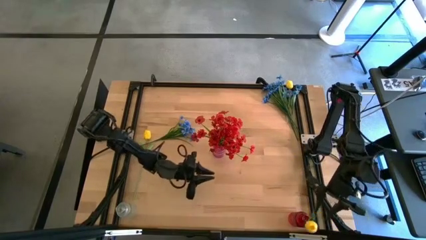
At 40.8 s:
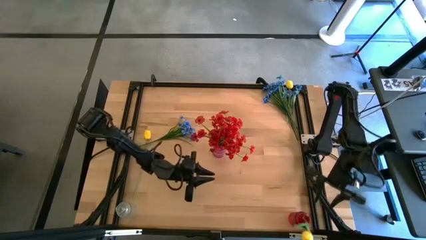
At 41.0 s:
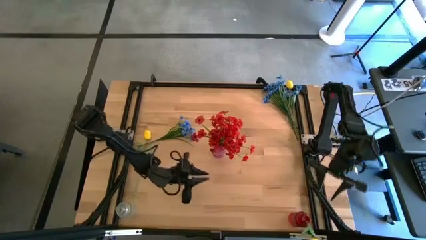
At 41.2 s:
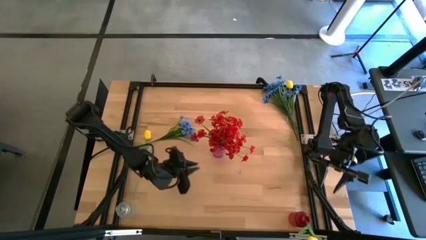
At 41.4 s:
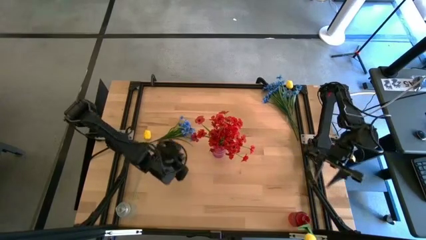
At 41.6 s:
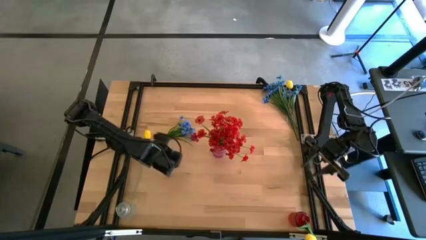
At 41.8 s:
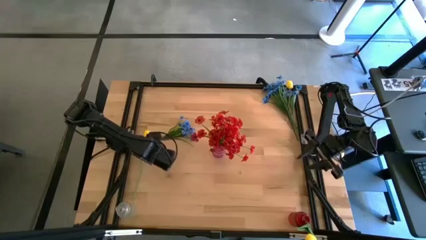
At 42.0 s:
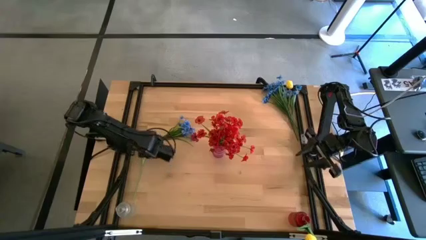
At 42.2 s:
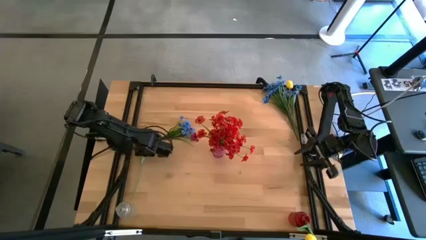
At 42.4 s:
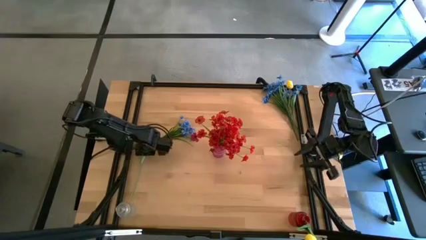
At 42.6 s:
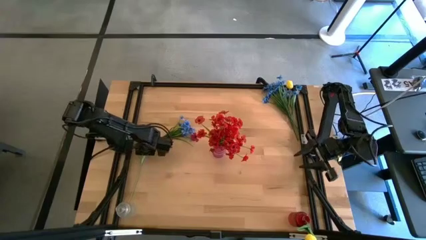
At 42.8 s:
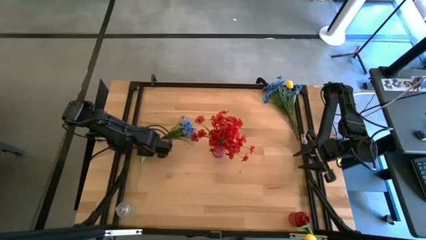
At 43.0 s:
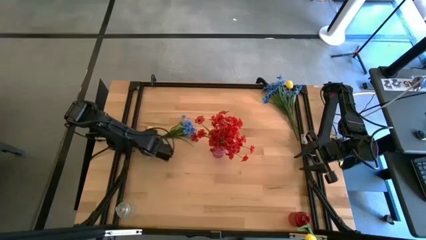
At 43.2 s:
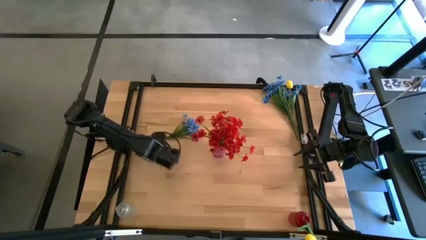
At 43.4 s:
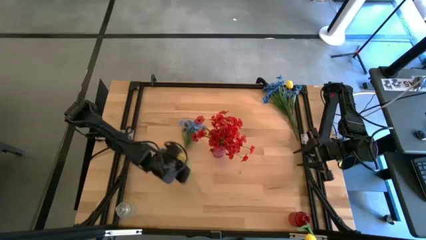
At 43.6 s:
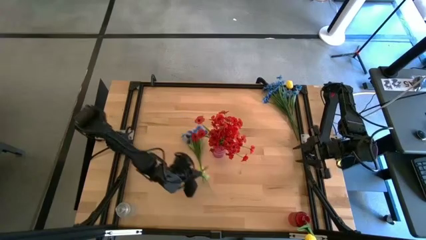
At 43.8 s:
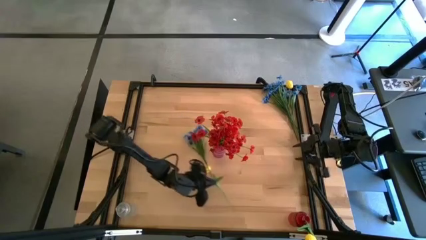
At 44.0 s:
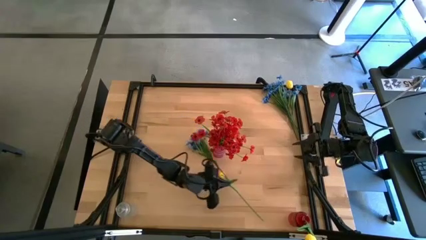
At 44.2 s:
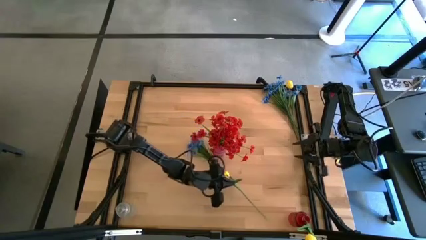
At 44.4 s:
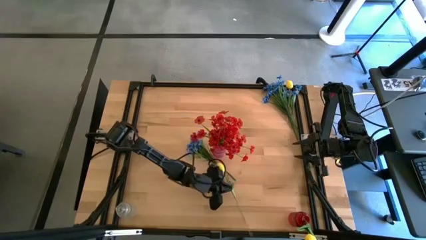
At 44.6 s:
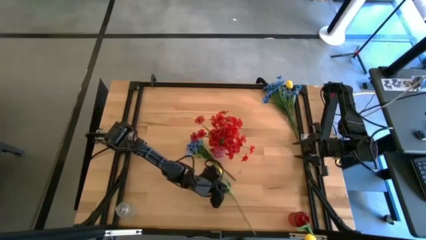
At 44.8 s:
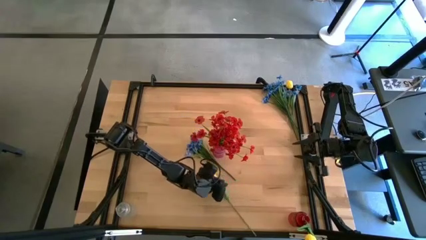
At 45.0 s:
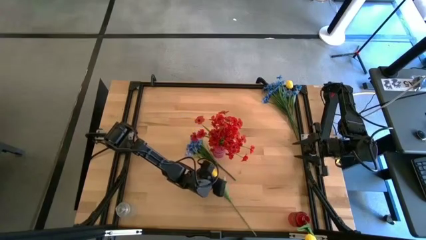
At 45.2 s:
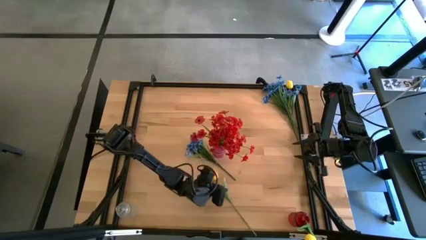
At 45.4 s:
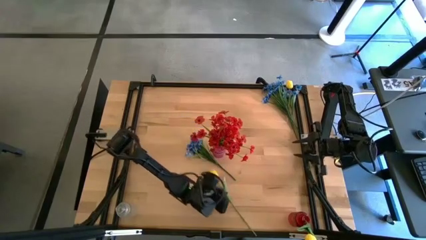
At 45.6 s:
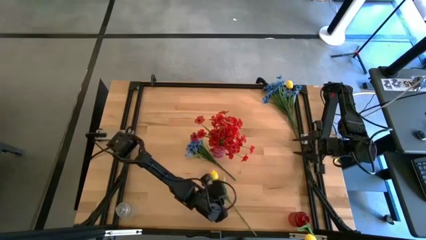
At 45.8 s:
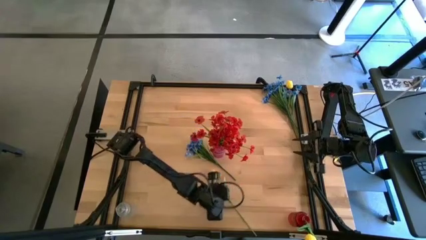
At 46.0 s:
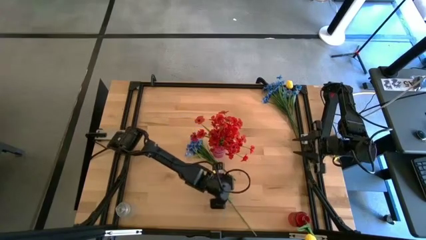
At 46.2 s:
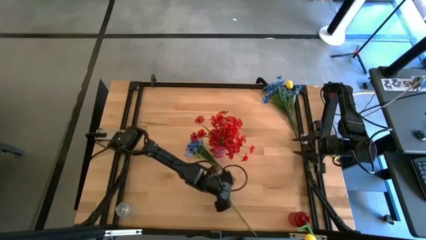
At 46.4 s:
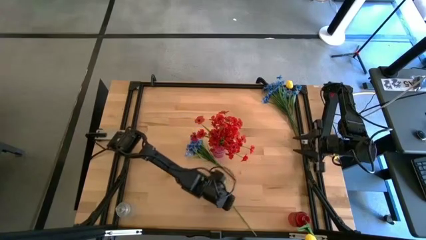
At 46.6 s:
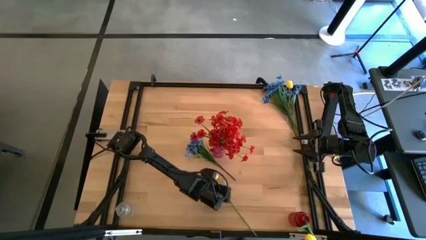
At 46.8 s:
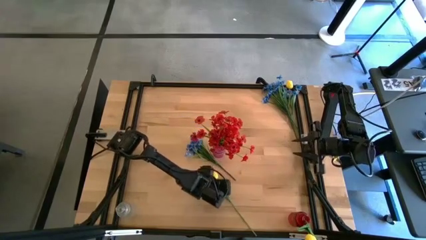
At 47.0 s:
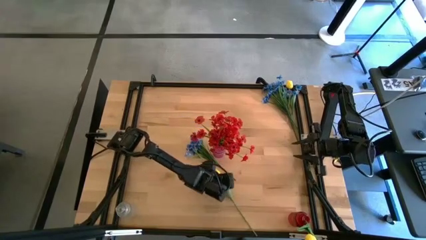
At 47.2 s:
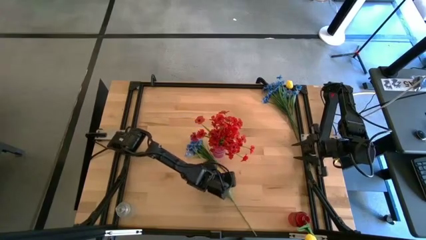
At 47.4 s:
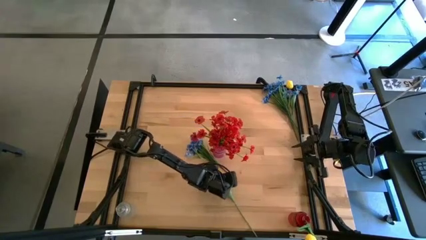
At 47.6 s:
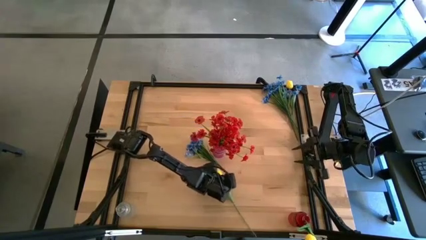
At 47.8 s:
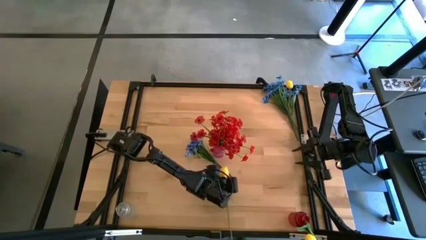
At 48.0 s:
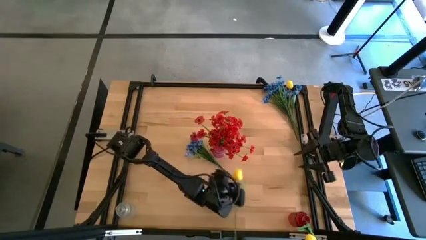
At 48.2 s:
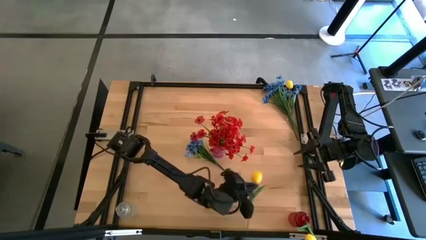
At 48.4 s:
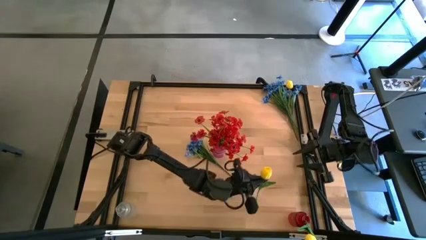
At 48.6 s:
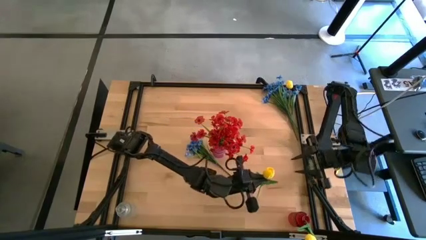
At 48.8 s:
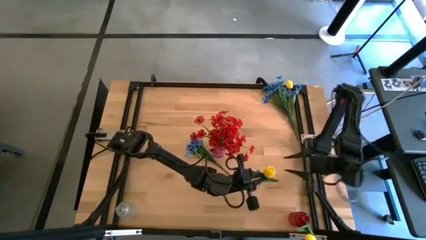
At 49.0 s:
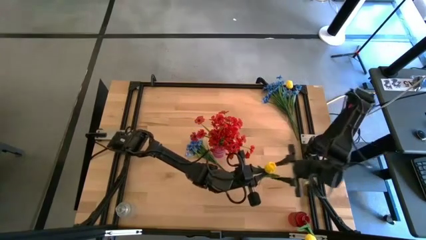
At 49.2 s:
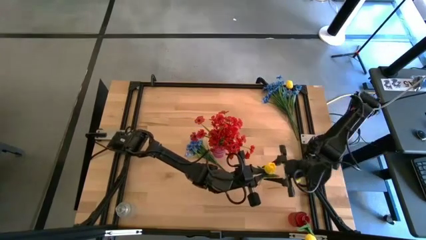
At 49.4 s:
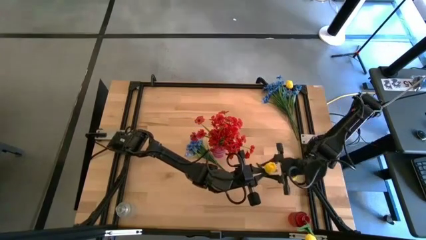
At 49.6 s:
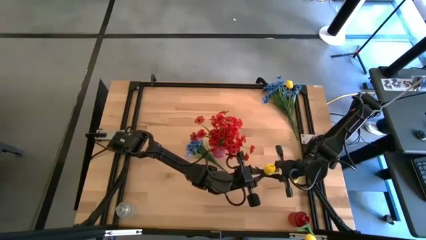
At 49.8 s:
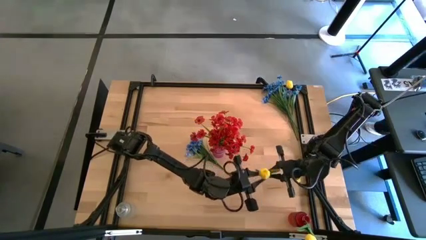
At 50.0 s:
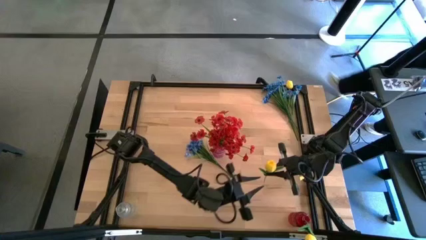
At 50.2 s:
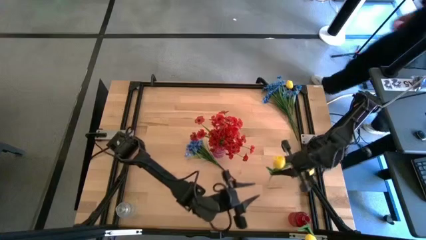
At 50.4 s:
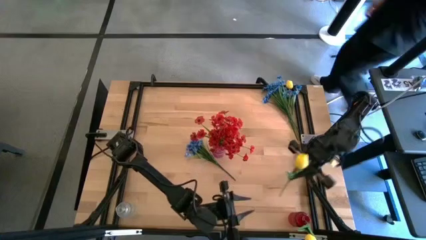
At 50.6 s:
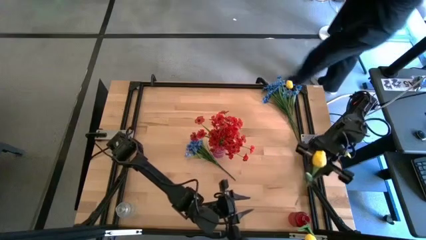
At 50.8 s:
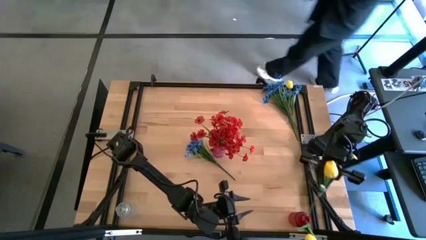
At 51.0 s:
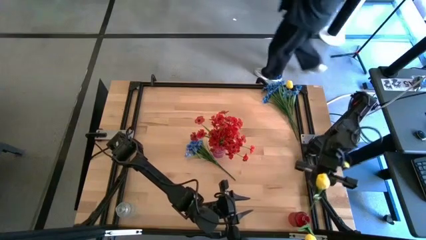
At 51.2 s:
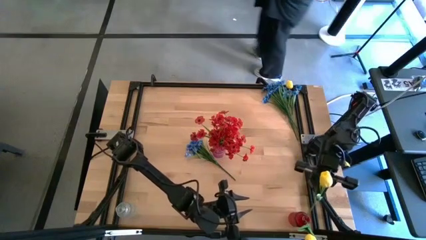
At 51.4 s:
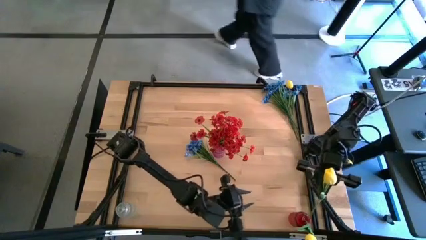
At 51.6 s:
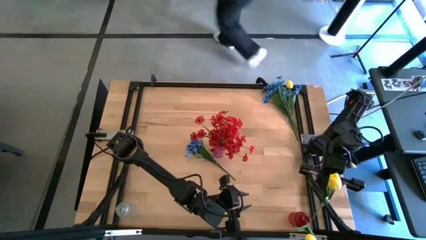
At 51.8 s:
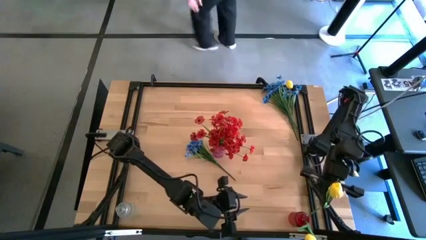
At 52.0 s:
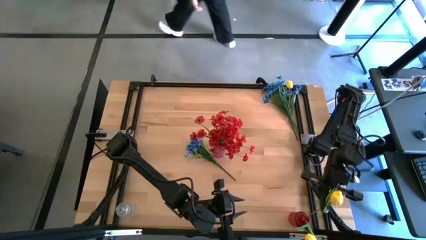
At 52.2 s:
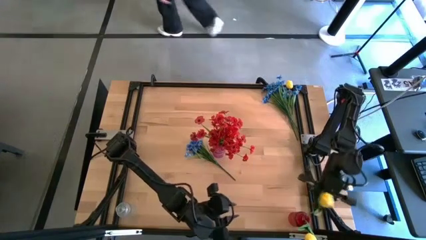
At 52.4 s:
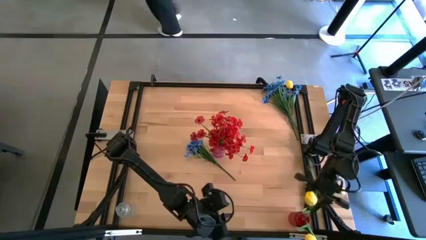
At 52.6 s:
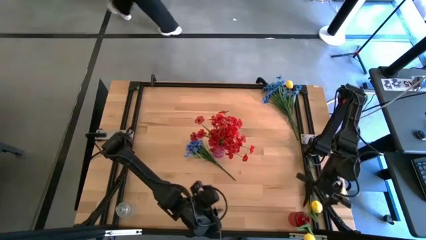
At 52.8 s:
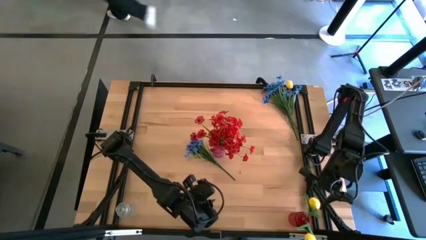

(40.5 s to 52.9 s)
Task: Sort flowers into vase by color
Put the left yellow tulip into the red vase

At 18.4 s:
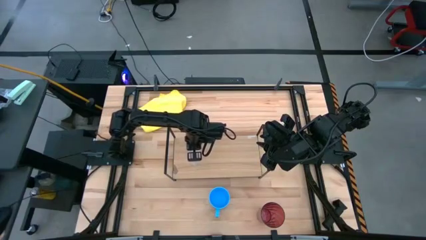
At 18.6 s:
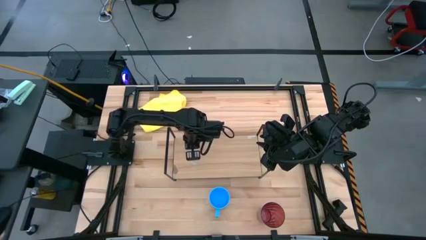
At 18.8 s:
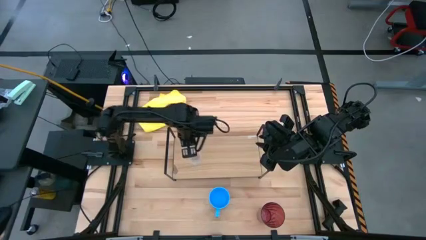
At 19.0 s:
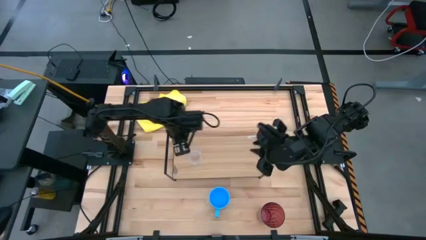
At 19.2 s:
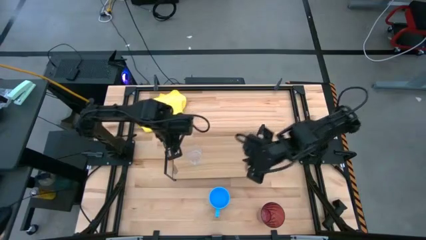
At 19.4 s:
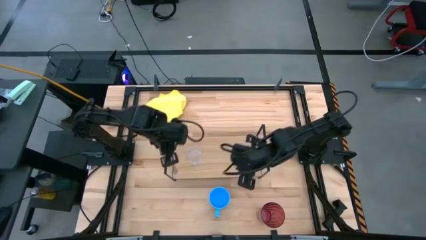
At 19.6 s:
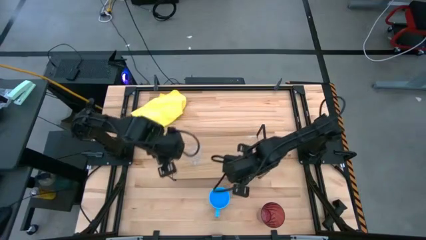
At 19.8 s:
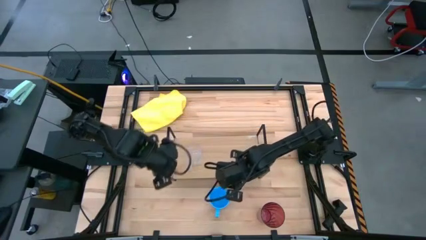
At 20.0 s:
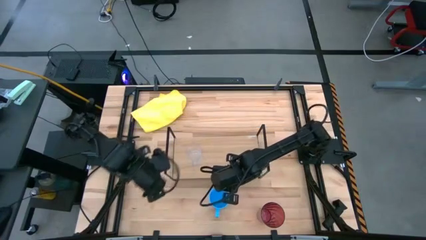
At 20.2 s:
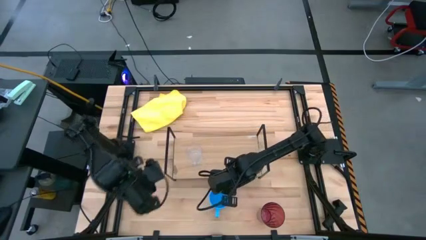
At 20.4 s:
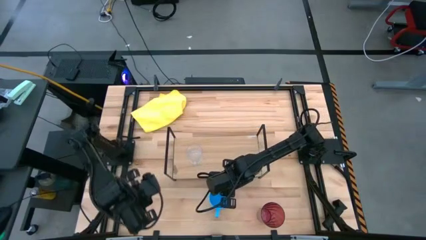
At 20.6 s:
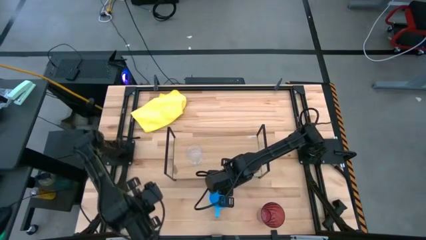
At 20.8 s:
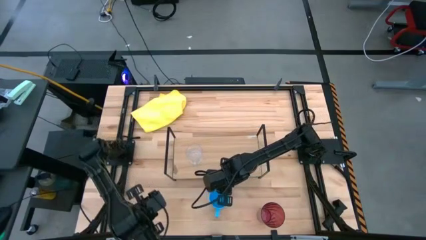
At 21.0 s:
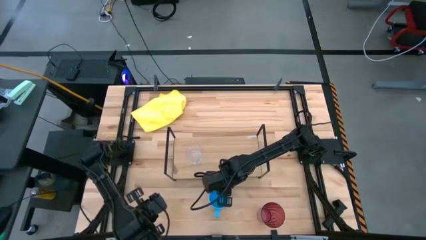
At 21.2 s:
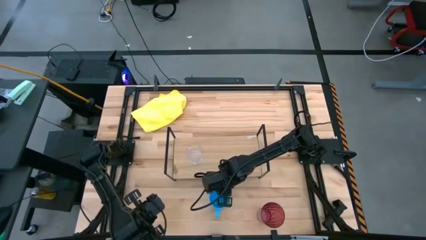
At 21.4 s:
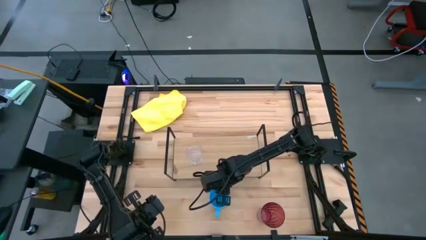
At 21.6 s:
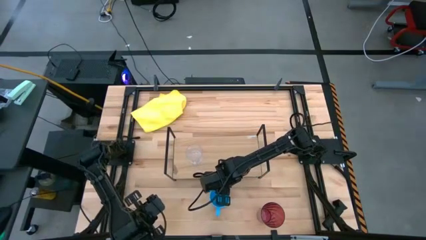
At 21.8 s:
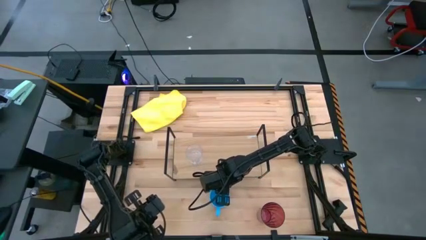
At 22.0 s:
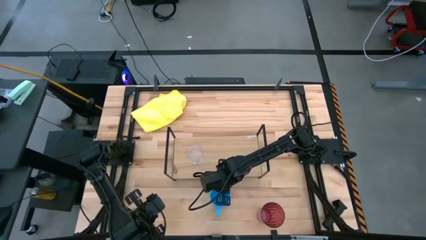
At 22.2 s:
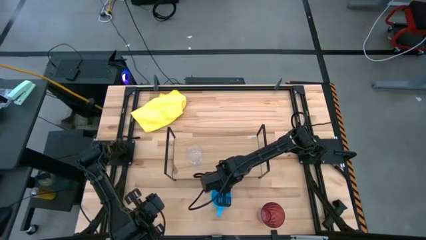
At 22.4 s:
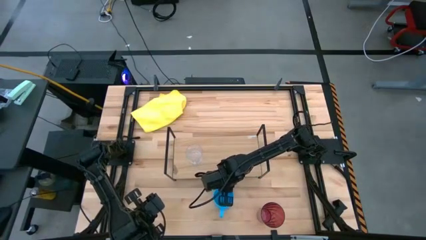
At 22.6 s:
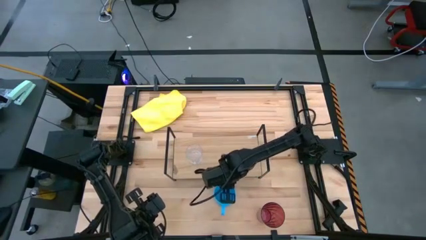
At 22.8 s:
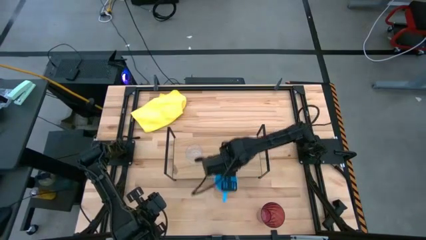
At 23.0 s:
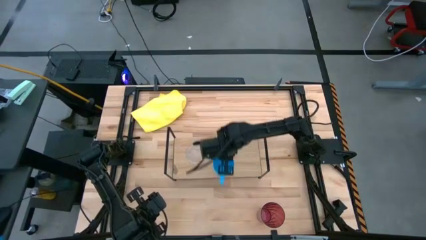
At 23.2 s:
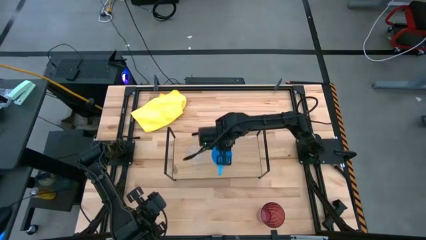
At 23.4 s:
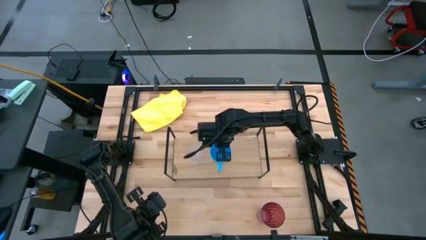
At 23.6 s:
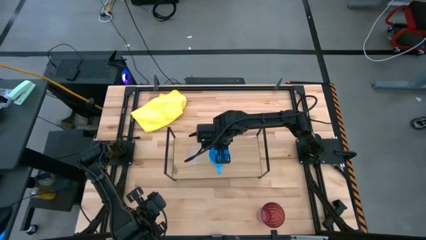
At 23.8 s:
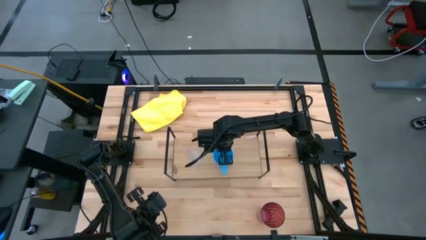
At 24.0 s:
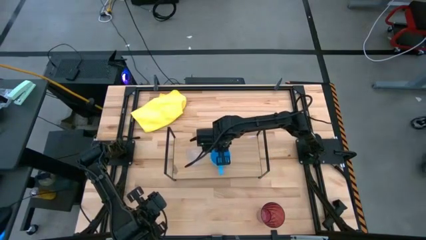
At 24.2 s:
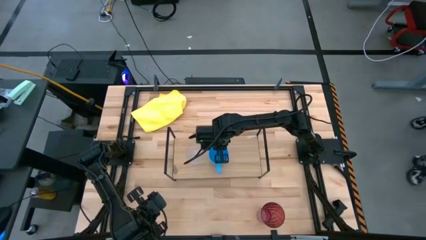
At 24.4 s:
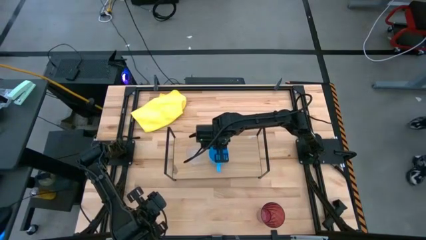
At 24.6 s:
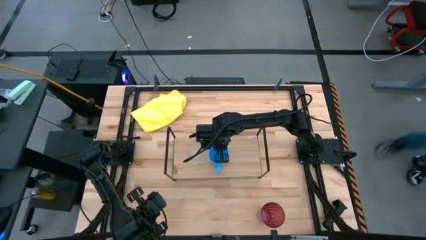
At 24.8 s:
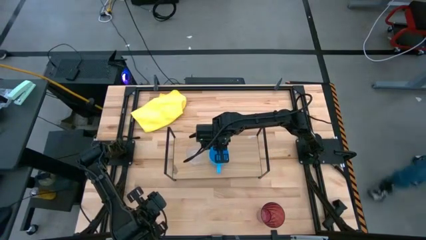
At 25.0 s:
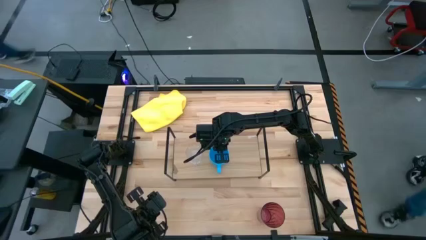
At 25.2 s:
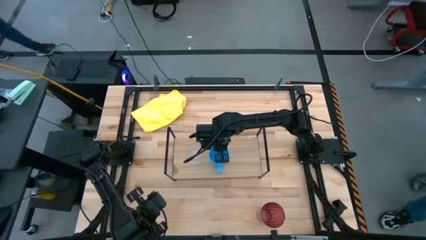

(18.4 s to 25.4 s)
Task: Stack small to large cups/mugs on shelf
Put the blue mug on the shelf
